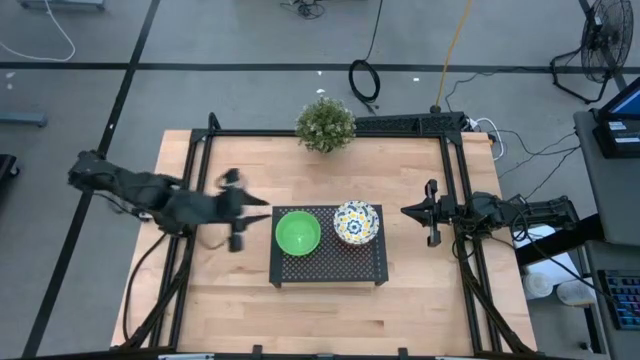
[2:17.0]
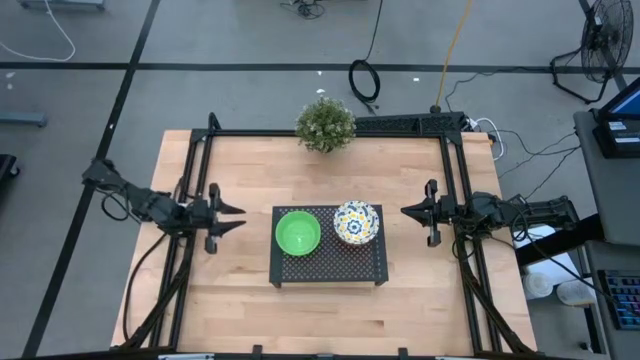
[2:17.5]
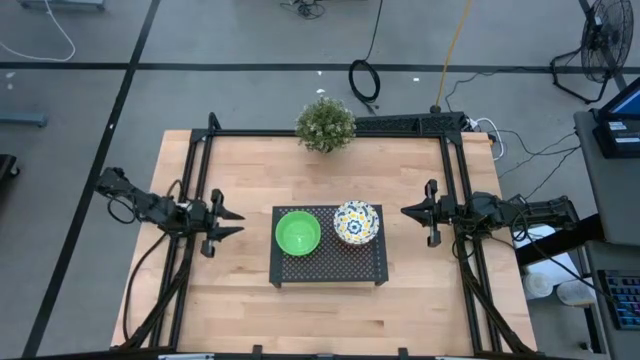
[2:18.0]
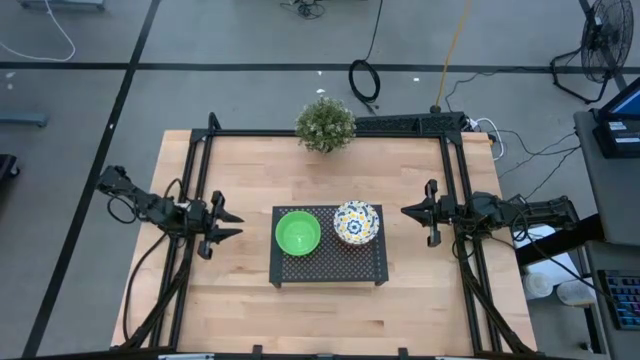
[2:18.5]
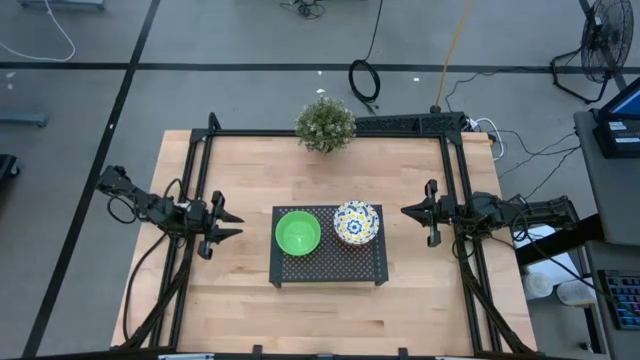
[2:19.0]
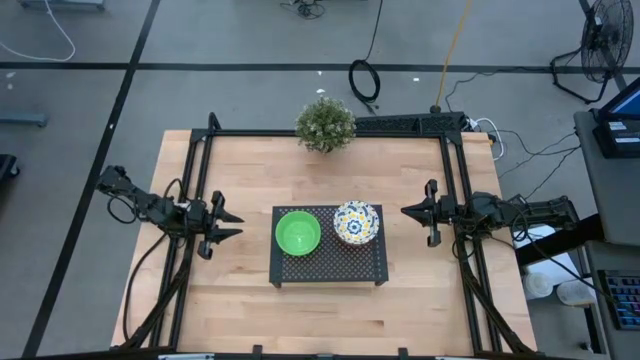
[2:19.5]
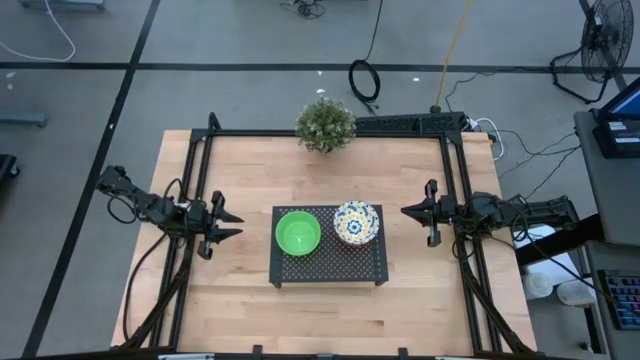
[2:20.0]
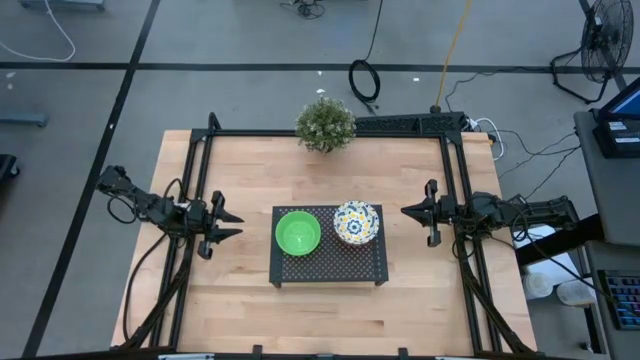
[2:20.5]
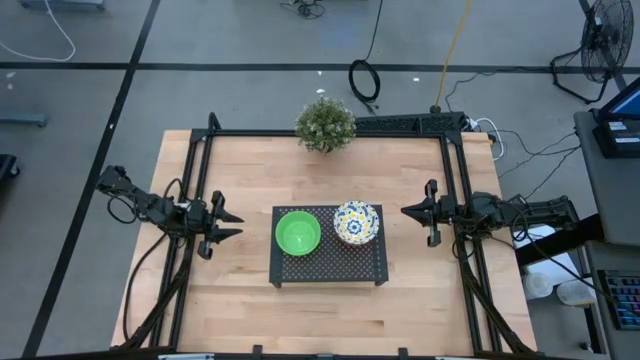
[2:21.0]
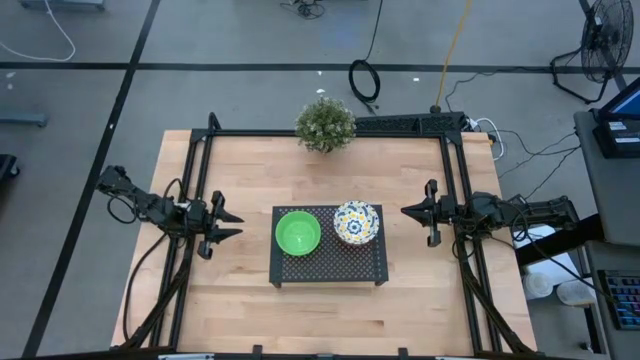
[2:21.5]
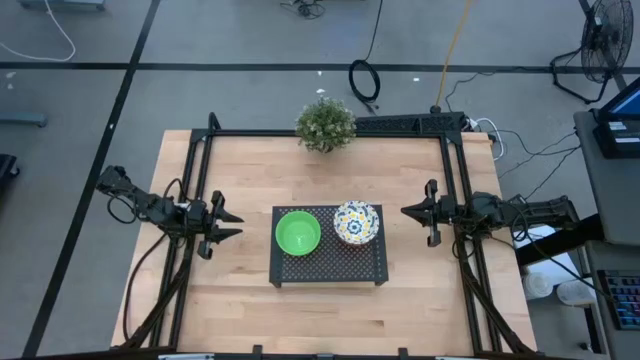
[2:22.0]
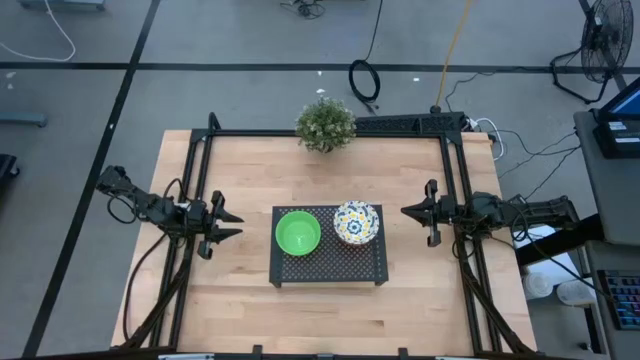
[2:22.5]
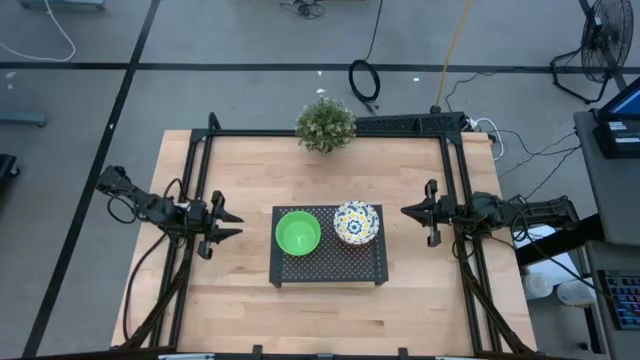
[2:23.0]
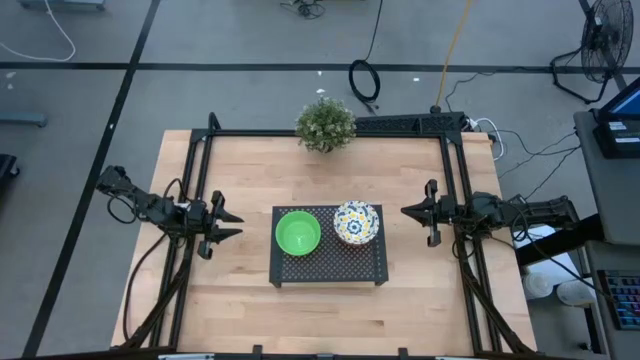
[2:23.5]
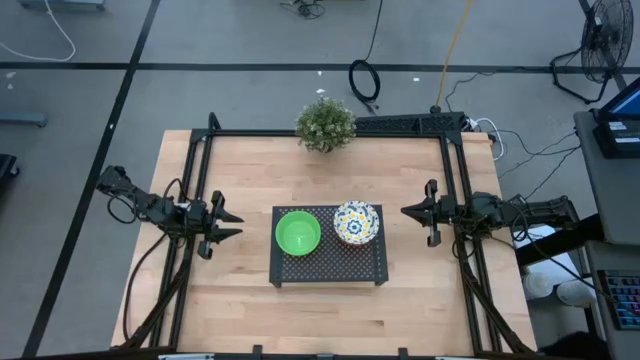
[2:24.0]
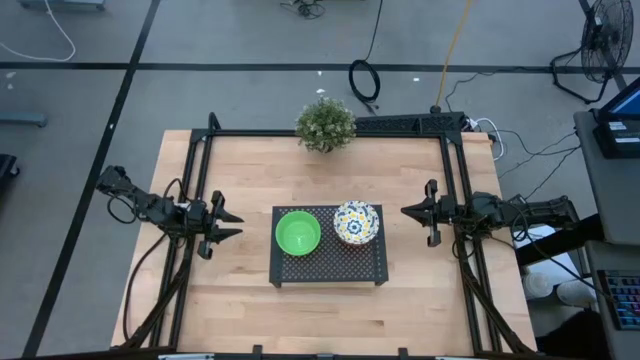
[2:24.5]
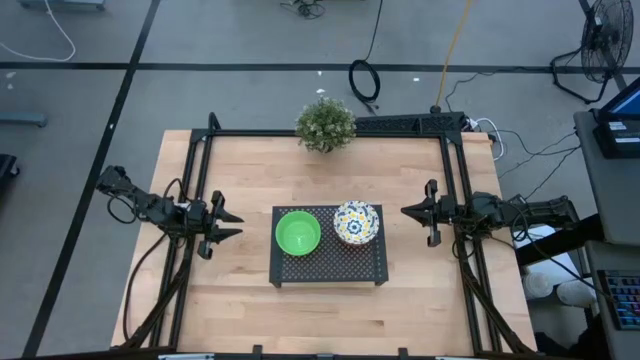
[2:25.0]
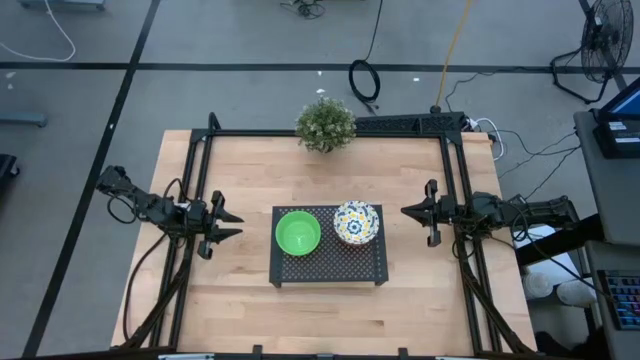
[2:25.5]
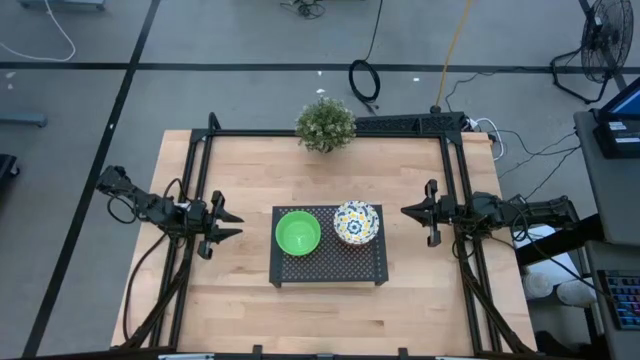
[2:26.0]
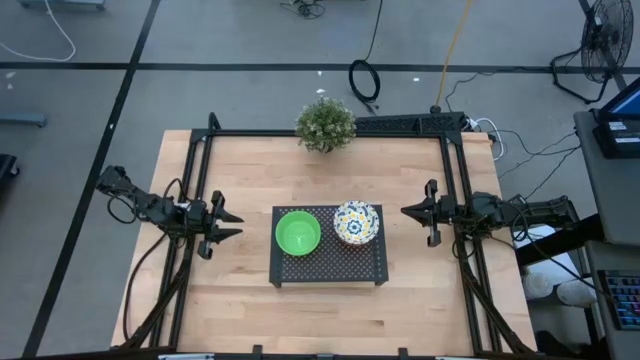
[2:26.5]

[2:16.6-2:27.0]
Task: Pick & Place Mini bowls
Return to Home Position

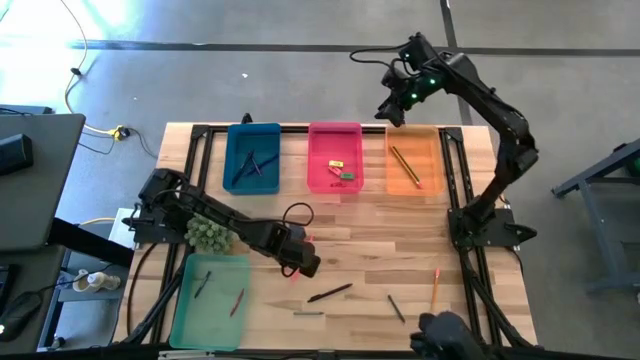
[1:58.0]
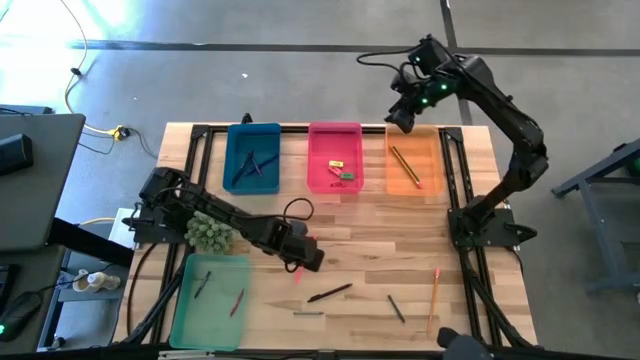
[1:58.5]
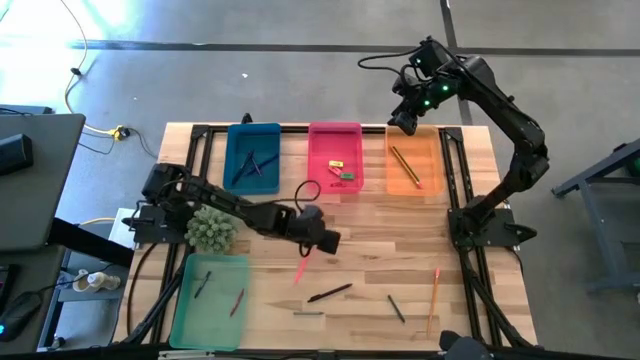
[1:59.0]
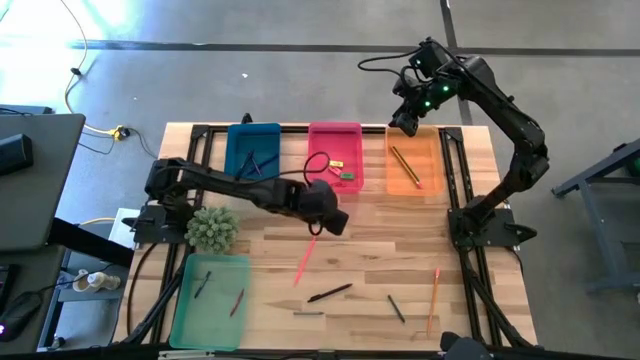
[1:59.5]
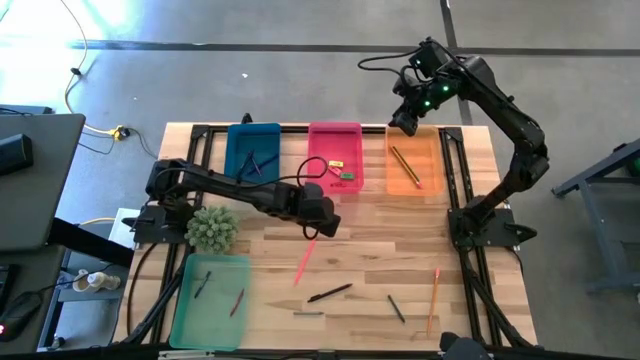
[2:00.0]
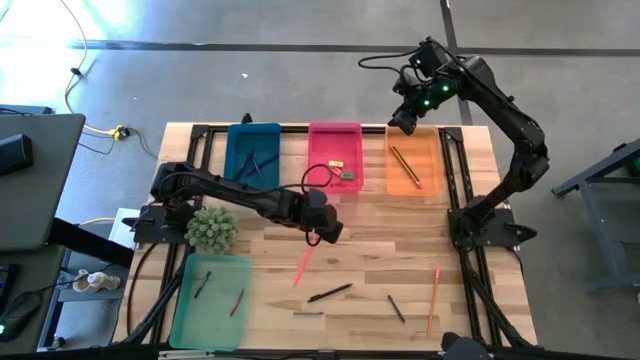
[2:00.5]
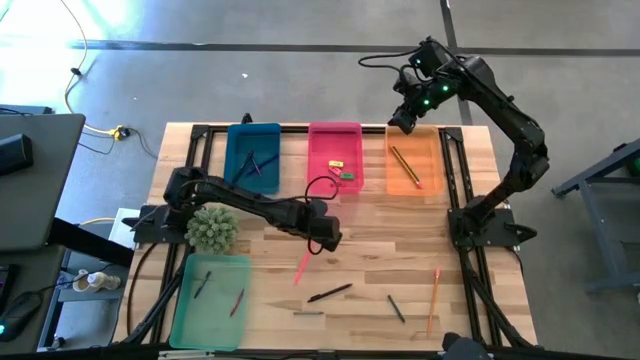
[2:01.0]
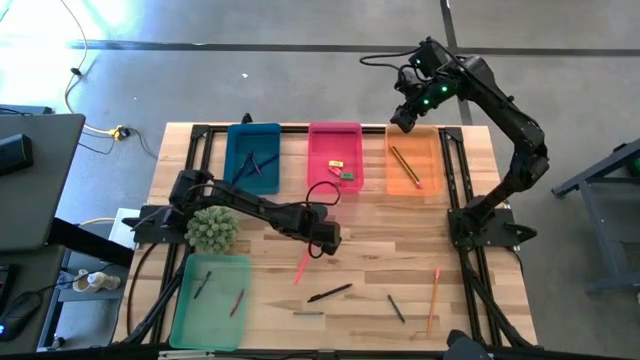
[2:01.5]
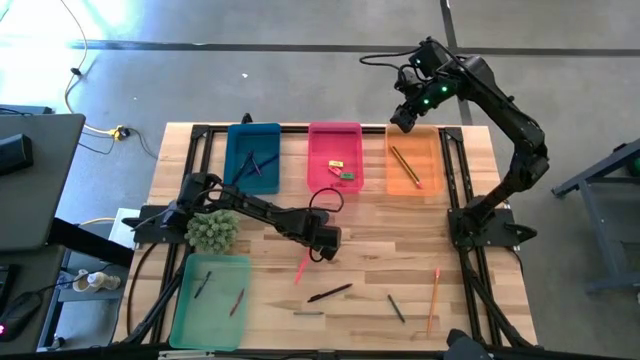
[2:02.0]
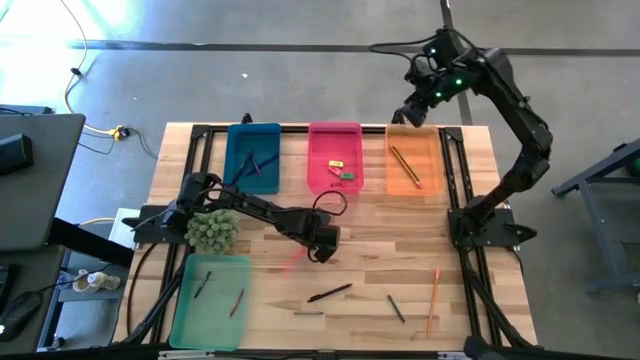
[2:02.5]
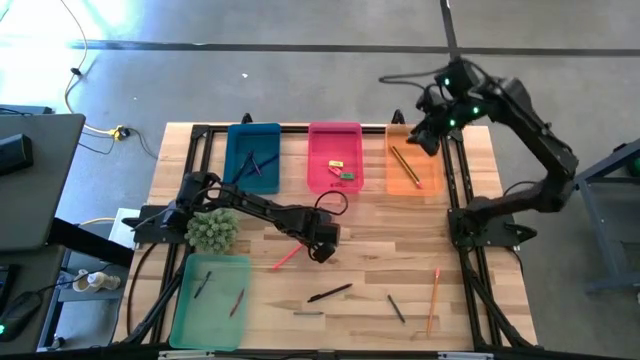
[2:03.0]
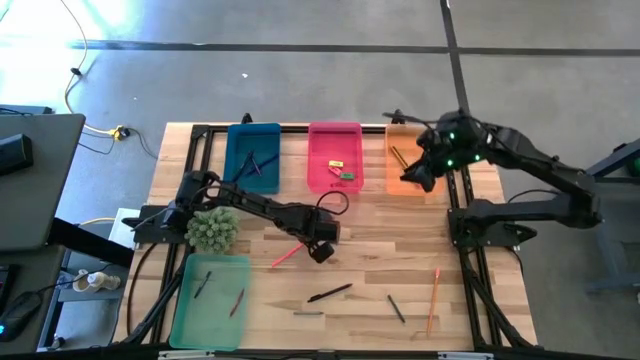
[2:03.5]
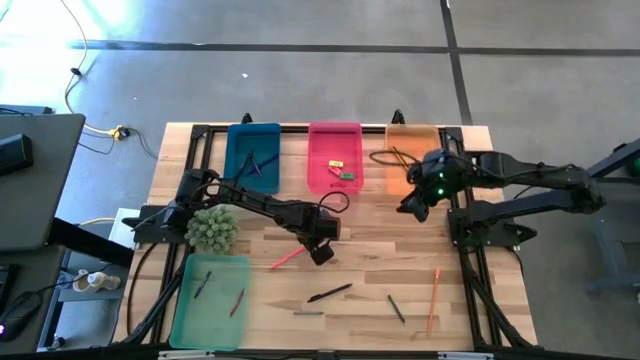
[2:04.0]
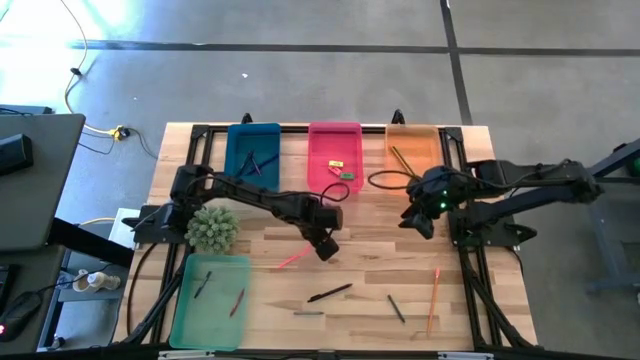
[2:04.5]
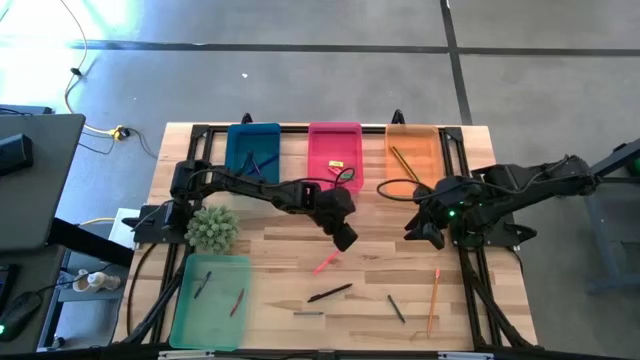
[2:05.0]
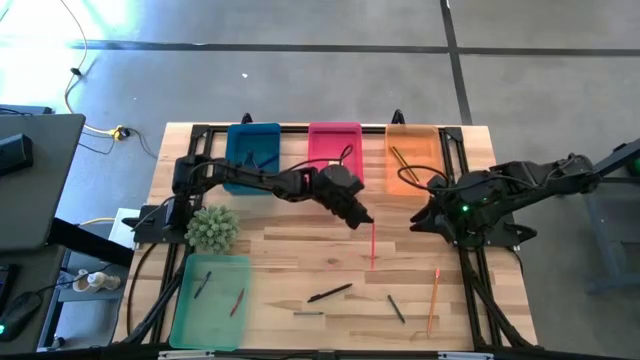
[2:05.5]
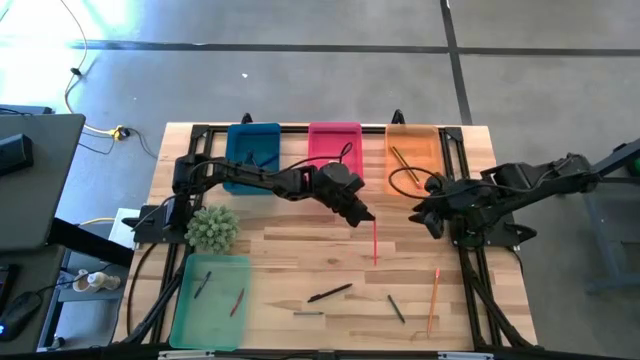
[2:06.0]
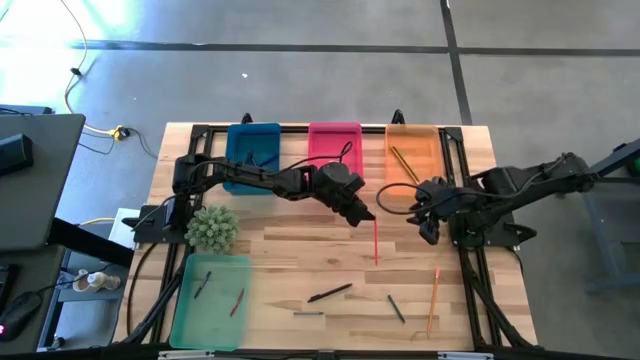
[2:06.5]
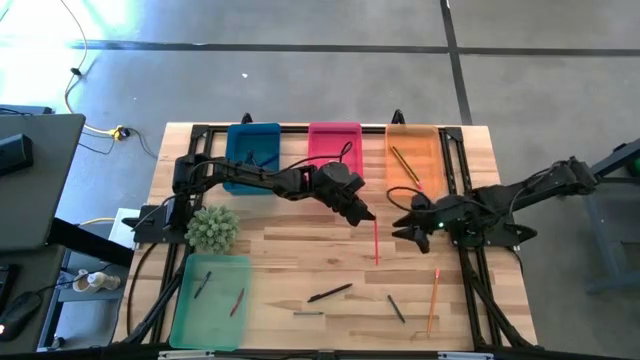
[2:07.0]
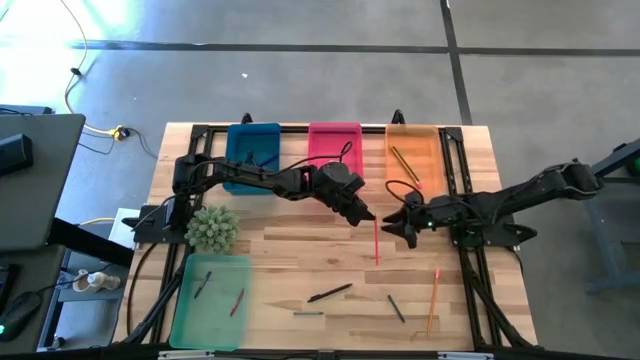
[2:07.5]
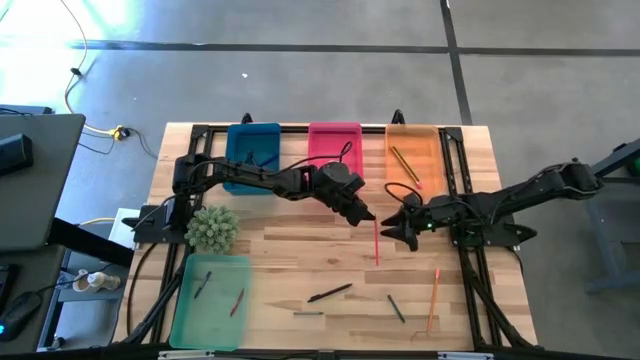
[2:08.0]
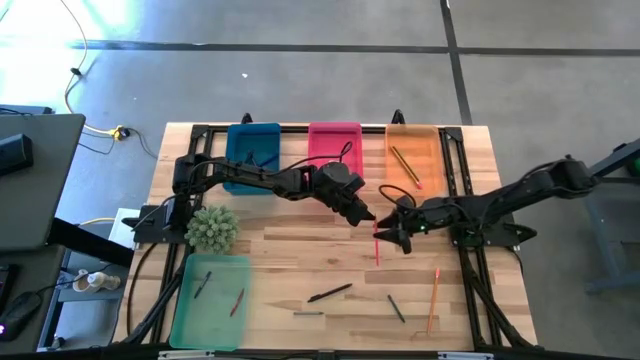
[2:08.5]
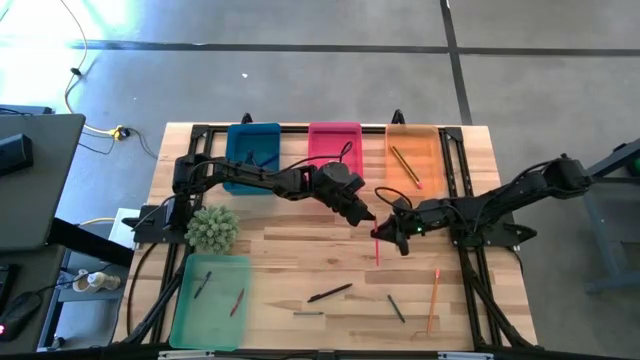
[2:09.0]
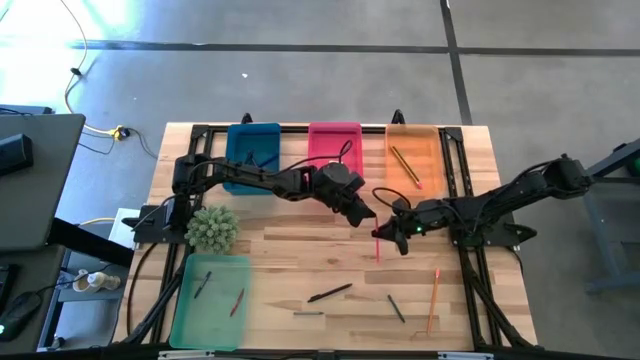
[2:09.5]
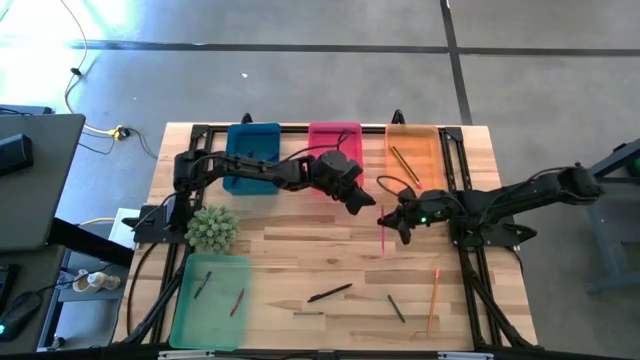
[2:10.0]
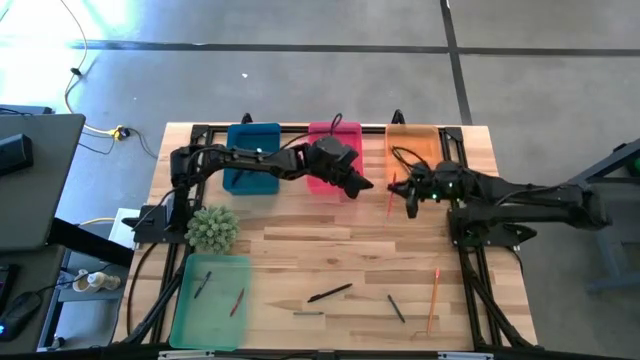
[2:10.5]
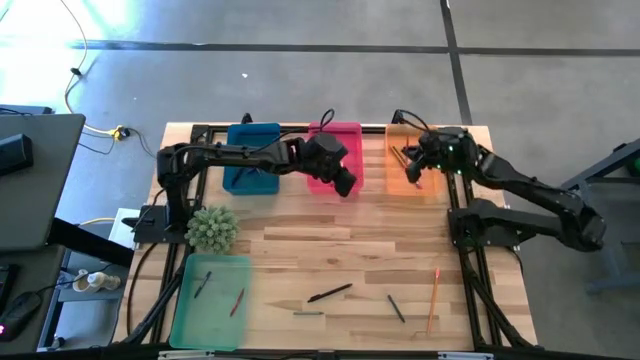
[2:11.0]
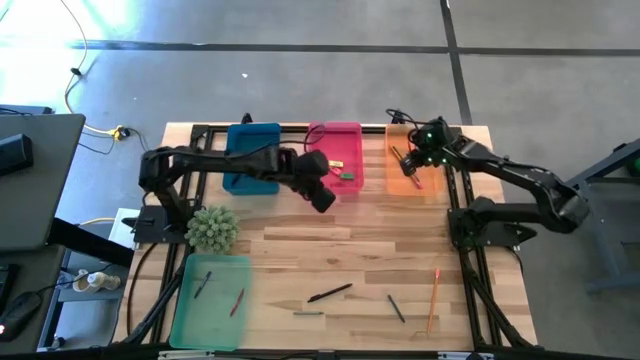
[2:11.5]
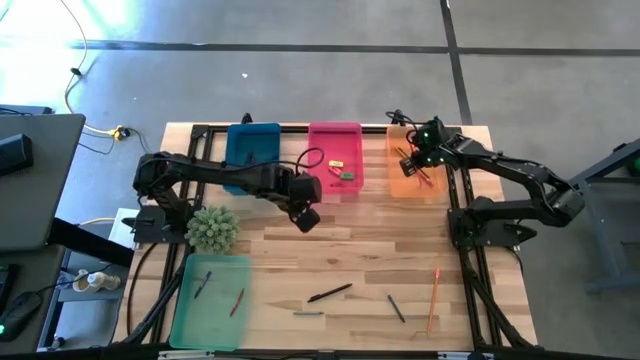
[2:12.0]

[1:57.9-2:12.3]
Task: Sort crayons/erasers/pens/pencils in bins
Put the pink pencil into the orange bin
